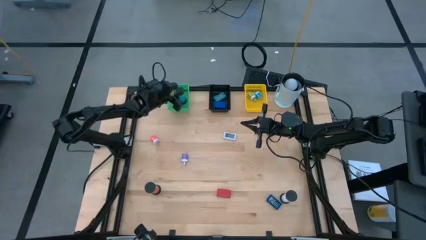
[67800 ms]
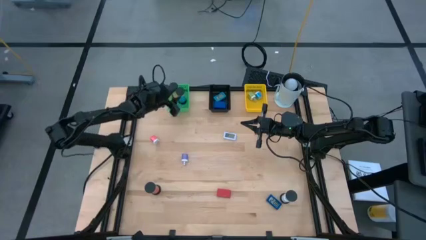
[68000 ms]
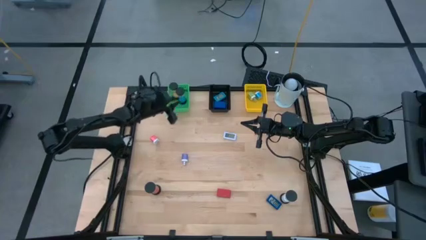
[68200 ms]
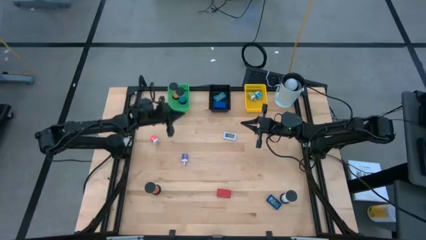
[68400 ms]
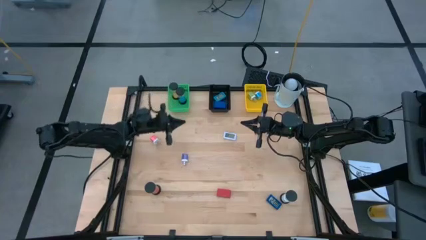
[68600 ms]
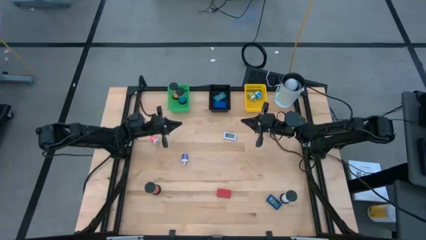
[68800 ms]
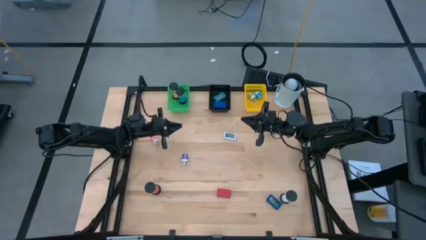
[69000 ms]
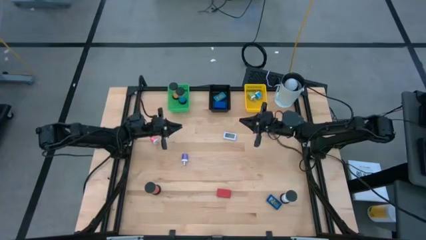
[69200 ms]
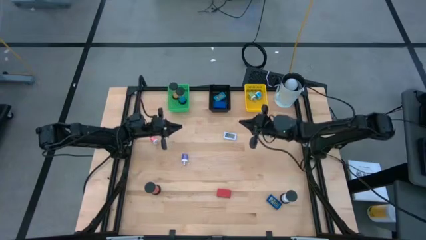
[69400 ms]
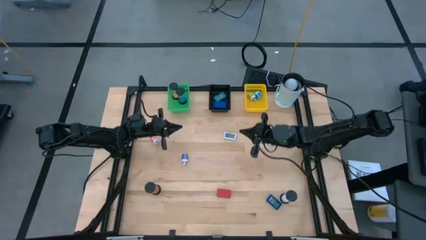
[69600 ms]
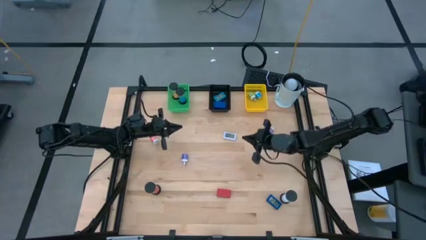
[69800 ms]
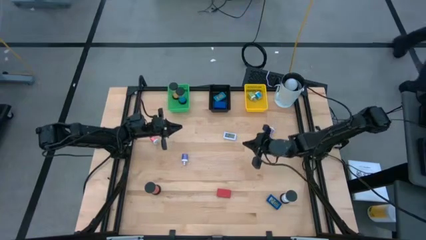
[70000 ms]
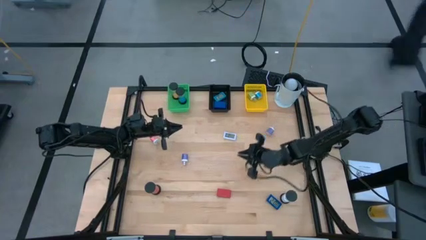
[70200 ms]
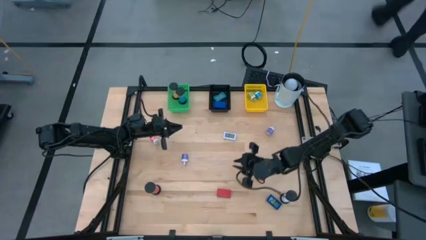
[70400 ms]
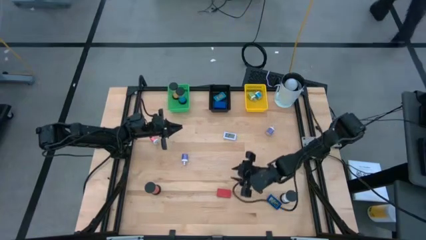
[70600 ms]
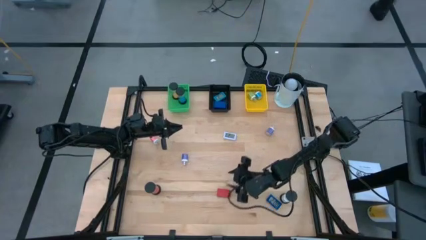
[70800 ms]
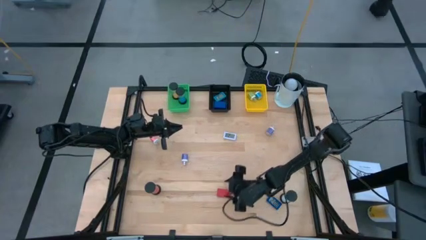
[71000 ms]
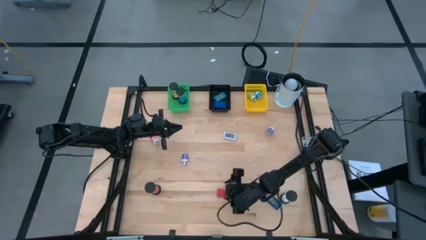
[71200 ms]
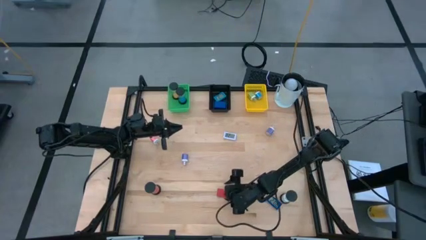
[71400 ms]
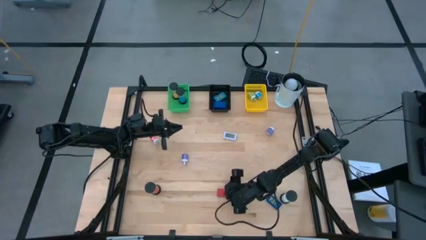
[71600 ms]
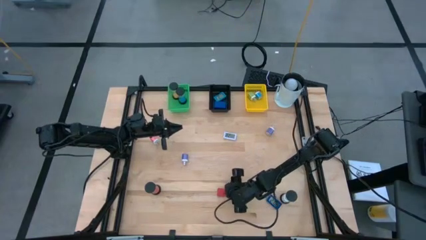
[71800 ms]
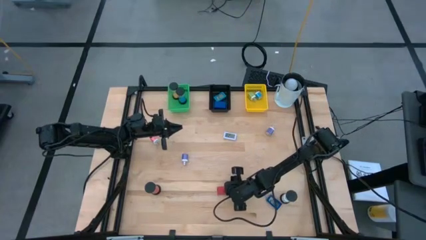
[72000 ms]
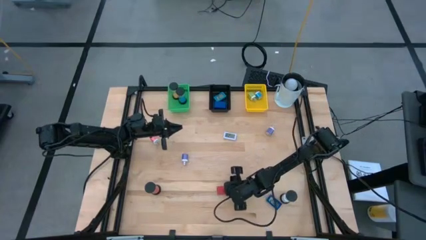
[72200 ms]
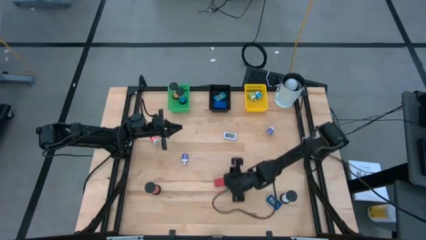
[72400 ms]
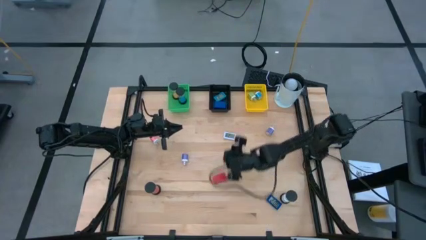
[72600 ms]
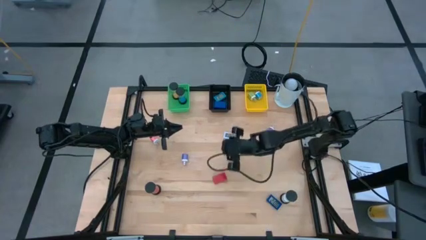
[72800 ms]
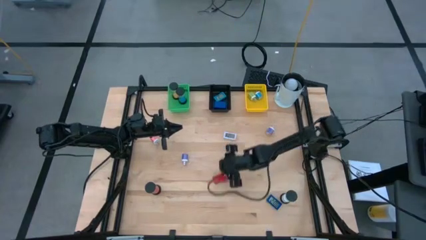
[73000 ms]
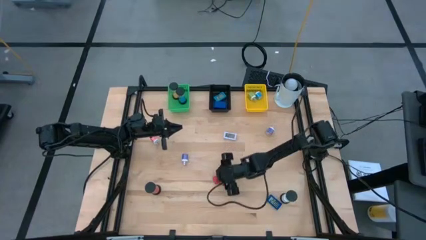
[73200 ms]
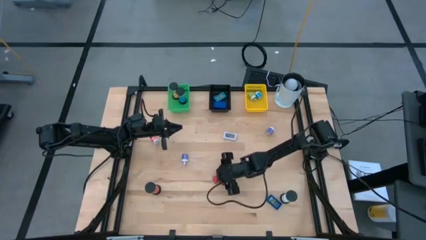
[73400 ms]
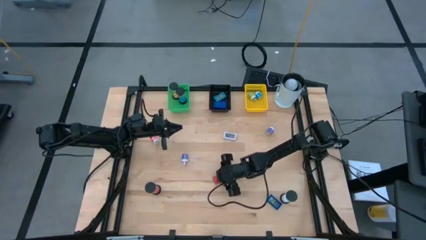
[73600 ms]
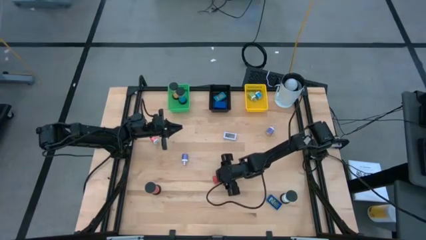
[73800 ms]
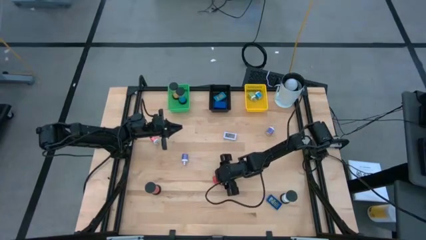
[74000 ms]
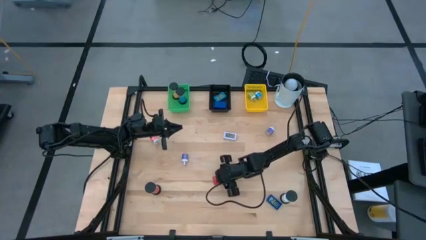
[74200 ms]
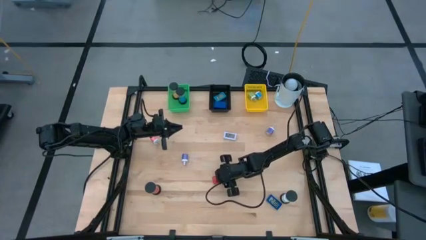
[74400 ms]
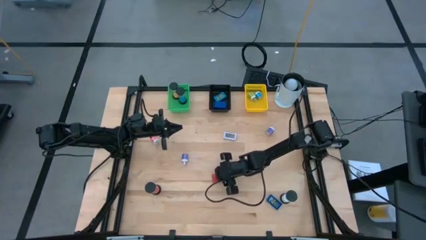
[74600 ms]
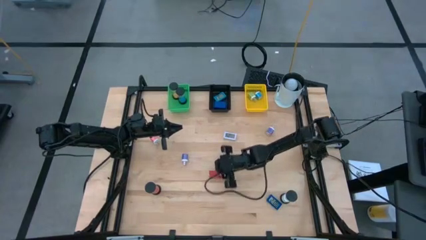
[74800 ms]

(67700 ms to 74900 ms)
Task: Pick & Place Office items
Put the red digital timer into the black bin

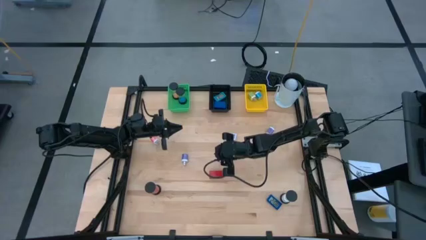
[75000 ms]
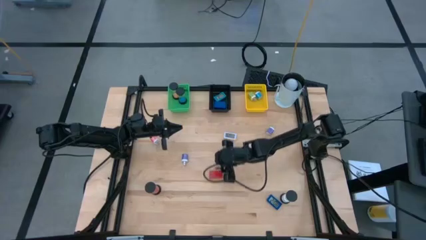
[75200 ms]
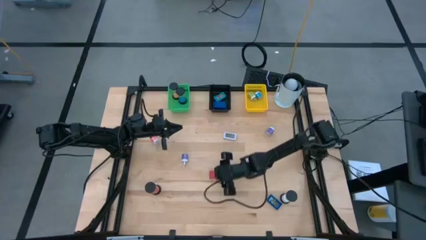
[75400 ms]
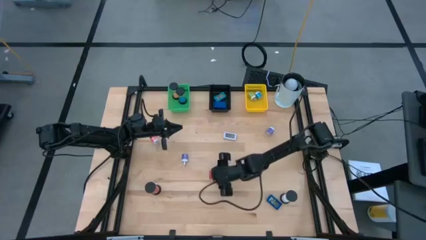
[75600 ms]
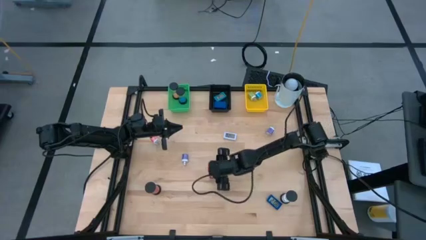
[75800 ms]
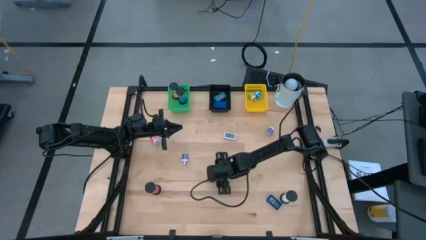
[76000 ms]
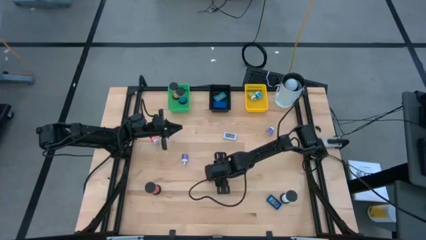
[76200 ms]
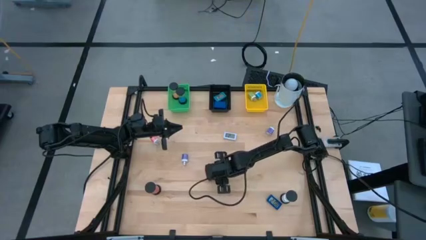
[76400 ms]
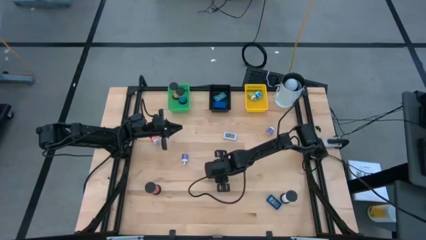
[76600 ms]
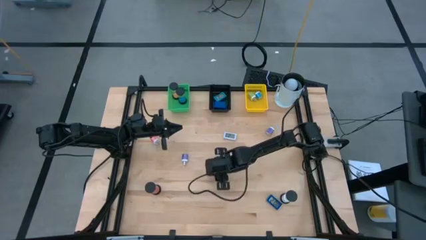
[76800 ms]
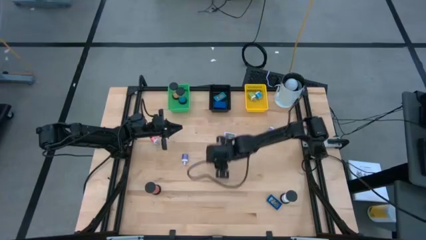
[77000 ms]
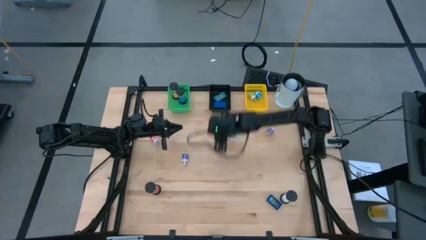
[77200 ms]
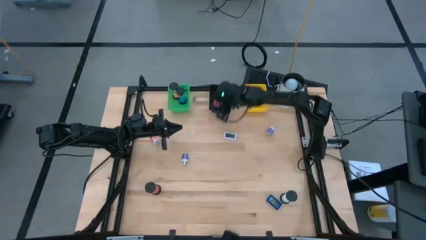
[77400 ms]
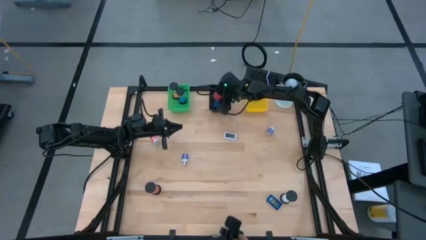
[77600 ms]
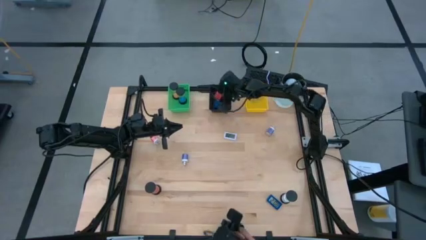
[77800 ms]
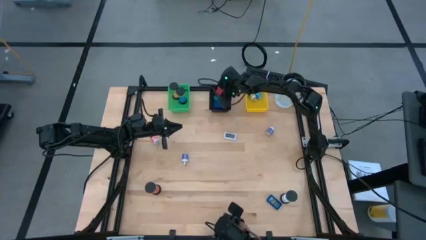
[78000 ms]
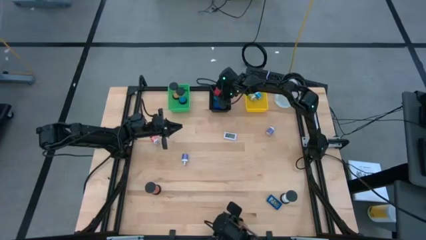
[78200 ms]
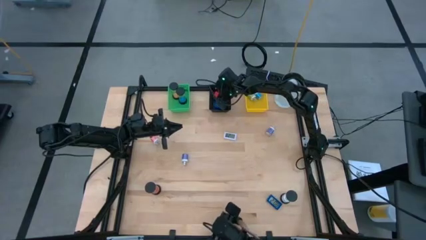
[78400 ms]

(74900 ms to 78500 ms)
Put the red digital timer into the black bin

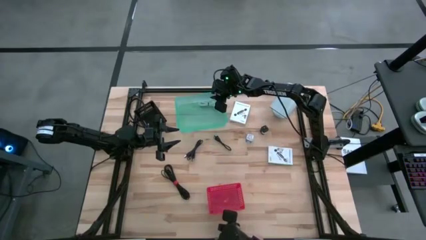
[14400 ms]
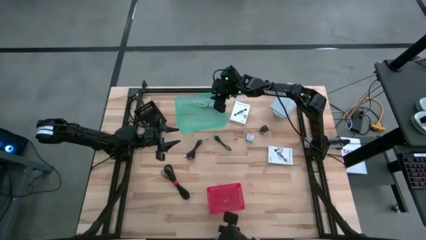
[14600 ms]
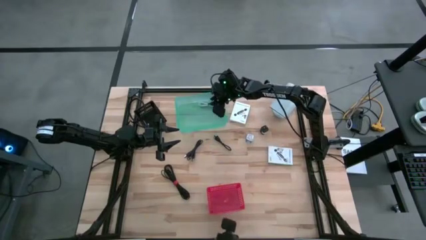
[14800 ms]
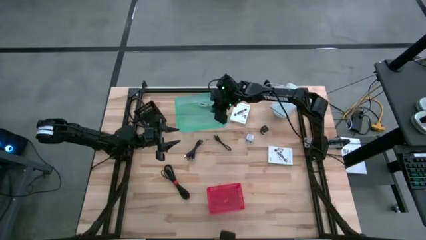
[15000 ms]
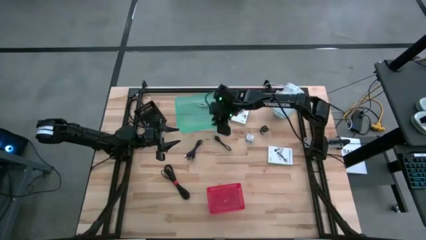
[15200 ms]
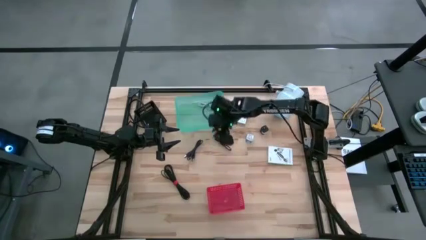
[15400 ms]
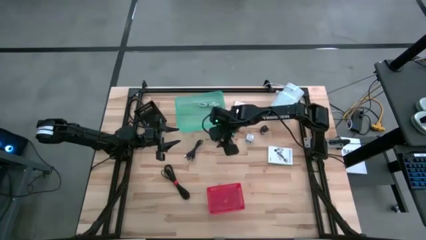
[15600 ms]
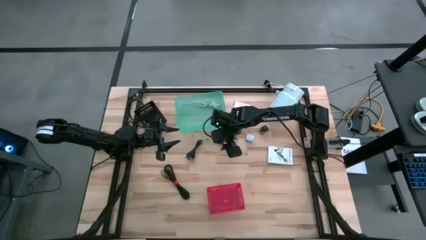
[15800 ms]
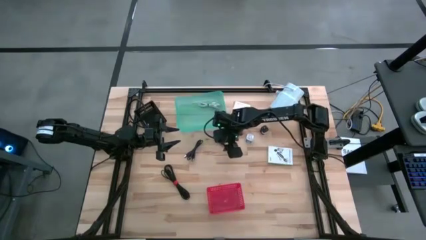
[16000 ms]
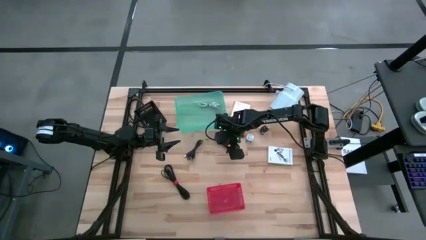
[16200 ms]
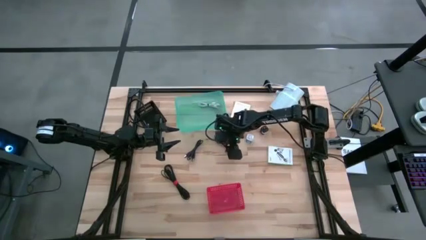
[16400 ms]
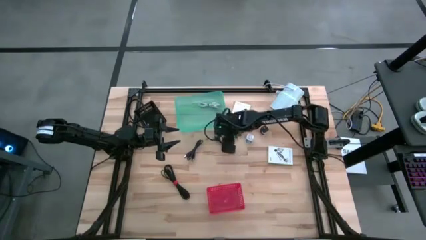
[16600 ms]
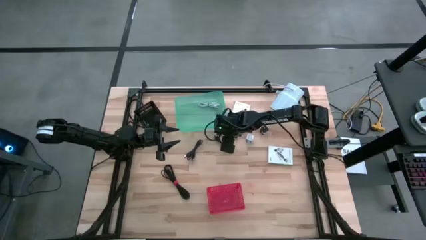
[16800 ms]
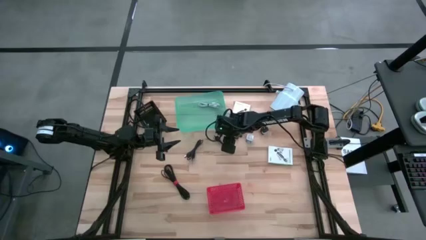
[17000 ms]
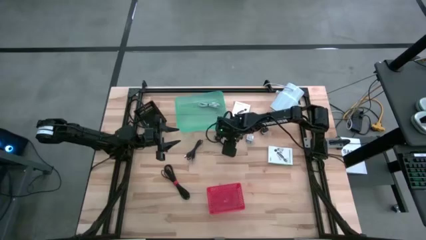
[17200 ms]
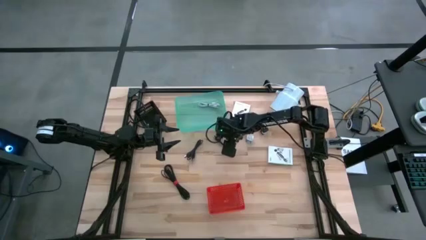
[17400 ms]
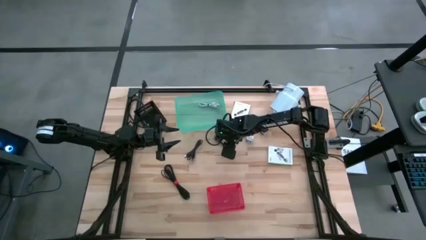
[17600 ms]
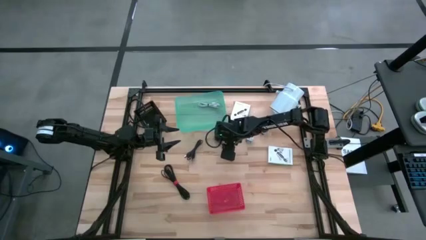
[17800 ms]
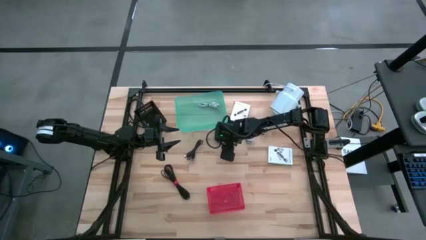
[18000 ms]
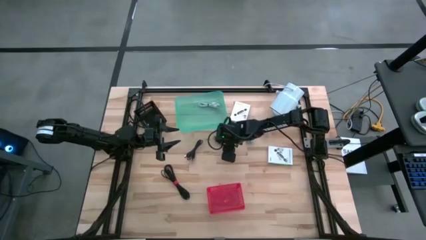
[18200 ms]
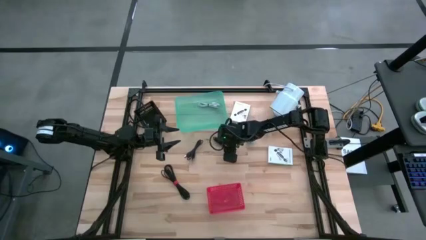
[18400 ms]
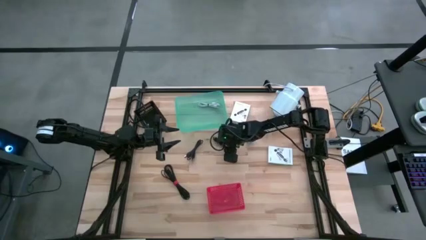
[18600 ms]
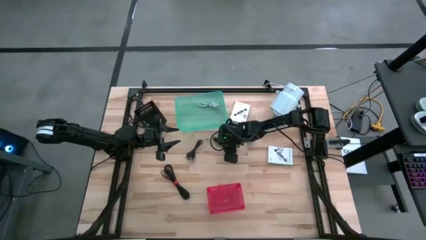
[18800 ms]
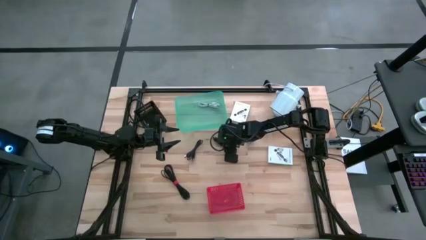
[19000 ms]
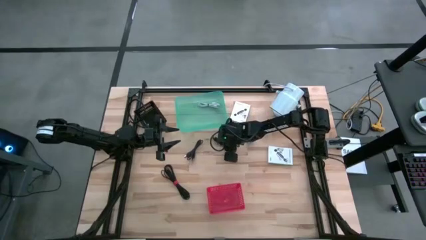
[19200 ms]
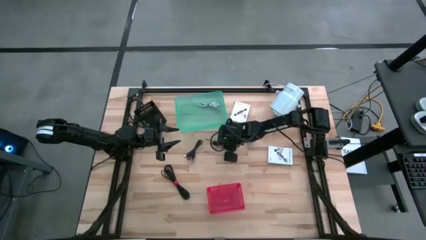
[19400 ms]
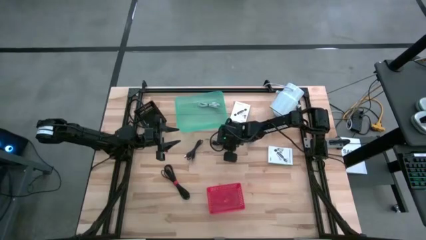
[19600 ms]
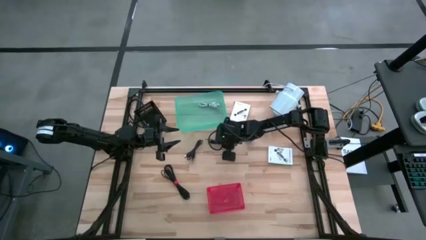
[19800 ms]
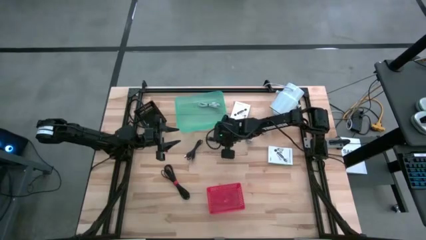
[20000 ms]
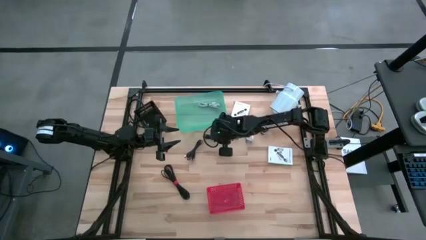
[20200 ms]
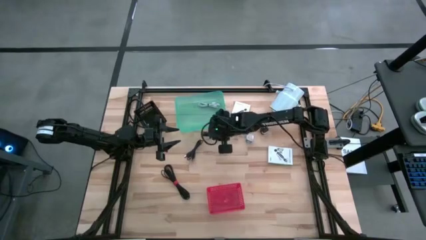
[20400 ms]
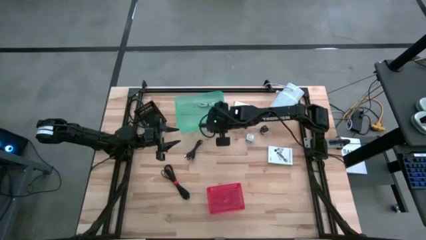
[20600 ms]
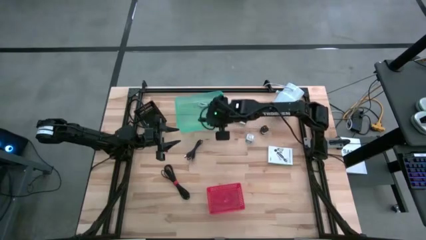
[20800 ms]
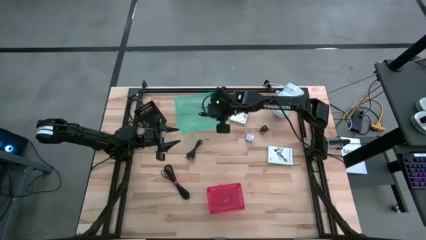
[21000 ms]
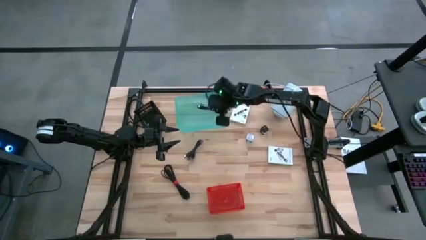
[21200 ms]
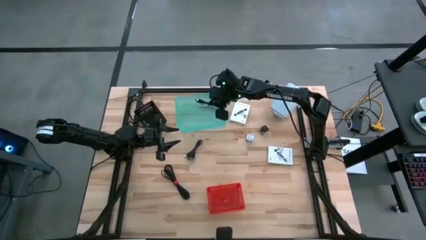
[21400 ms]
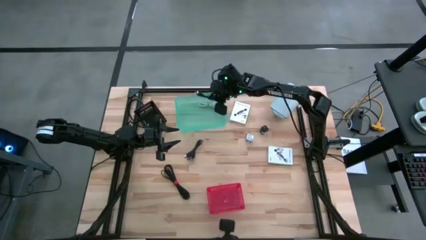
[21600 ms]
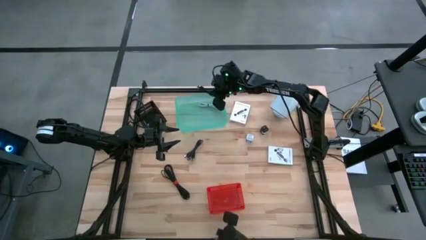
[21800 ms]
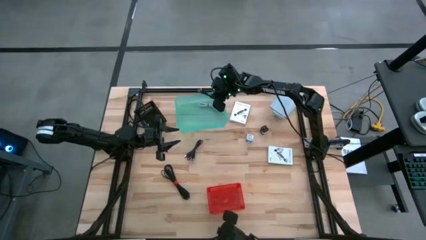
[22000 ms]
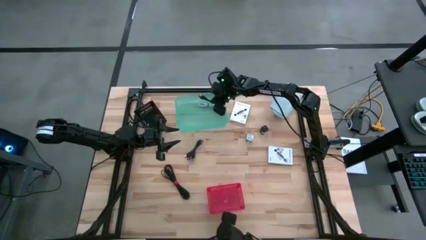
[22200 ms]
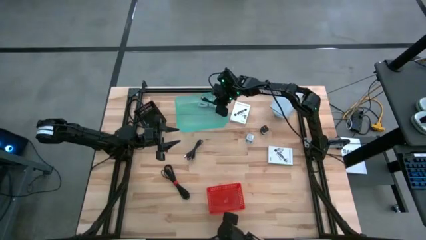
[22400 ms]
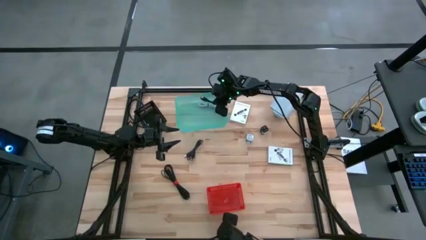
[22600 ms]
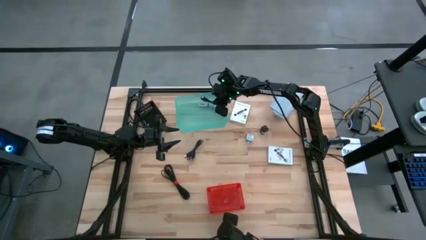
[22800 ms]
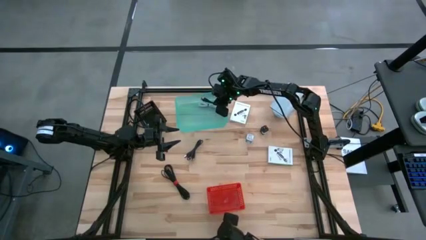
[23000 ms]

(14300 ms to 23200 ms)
Task: Pick and place items into bin
Put the top right black charger cable into the green bin
